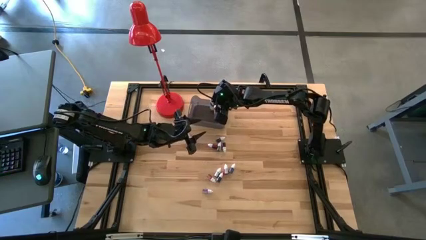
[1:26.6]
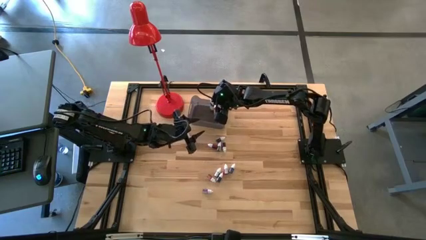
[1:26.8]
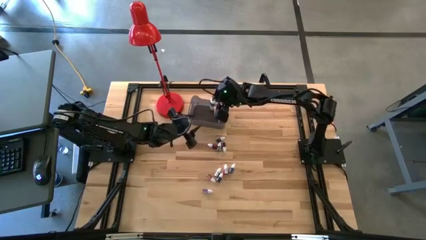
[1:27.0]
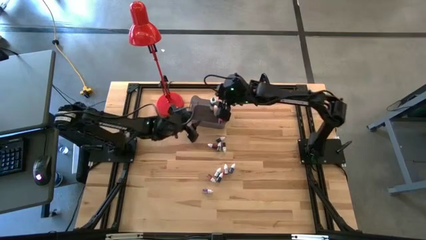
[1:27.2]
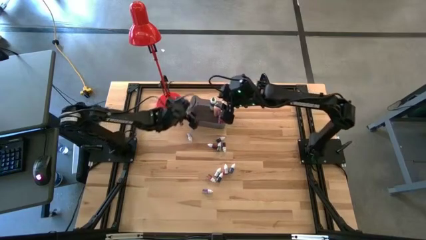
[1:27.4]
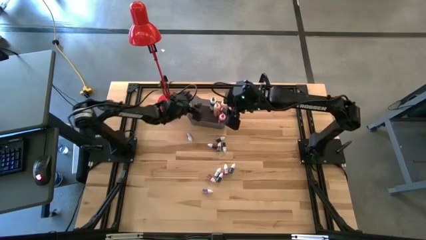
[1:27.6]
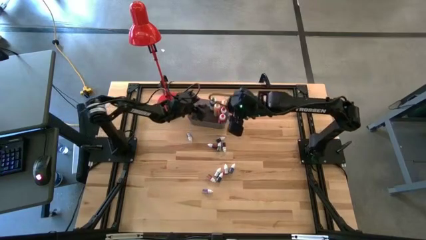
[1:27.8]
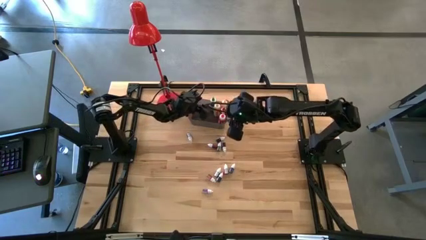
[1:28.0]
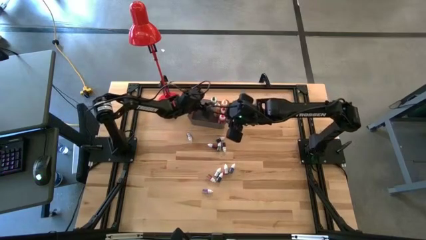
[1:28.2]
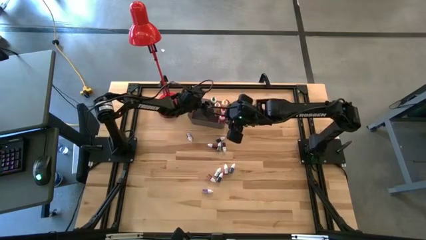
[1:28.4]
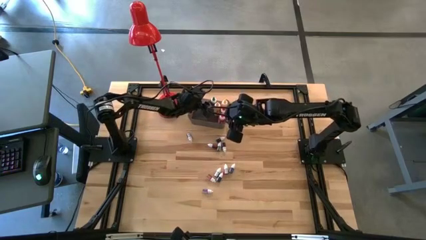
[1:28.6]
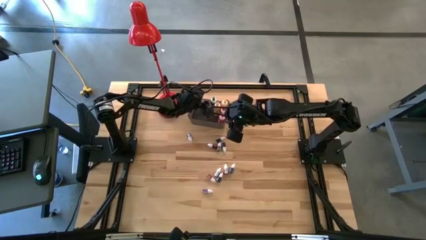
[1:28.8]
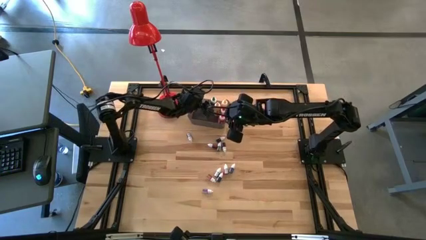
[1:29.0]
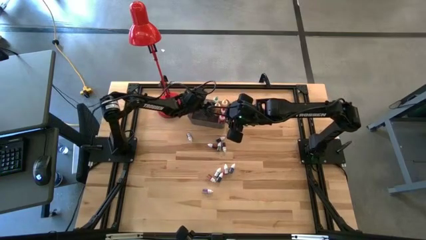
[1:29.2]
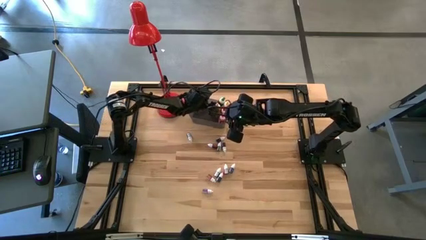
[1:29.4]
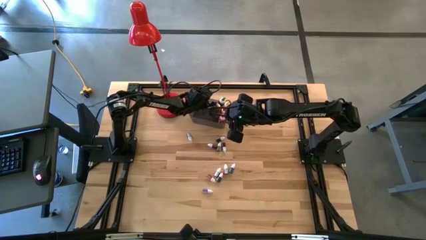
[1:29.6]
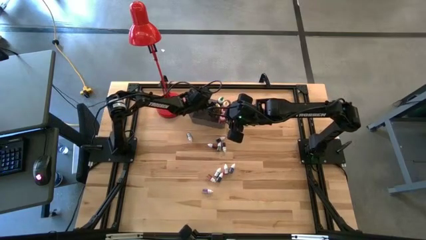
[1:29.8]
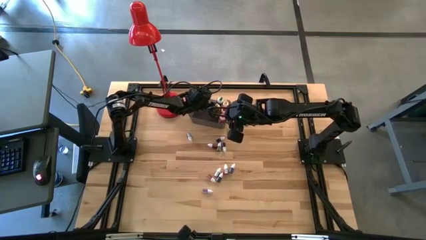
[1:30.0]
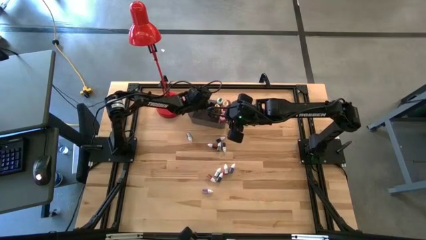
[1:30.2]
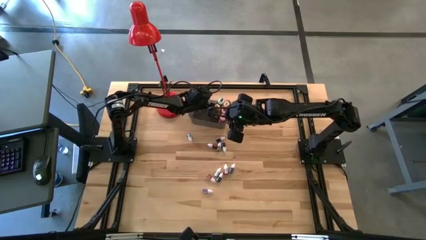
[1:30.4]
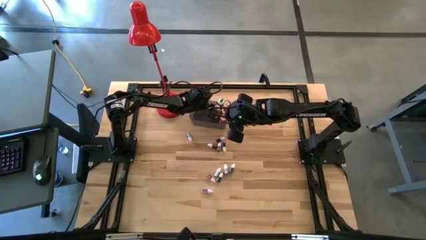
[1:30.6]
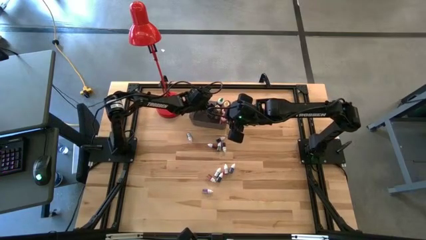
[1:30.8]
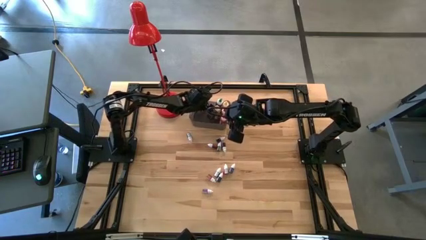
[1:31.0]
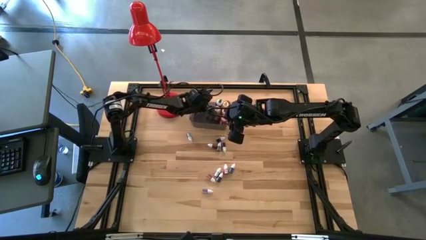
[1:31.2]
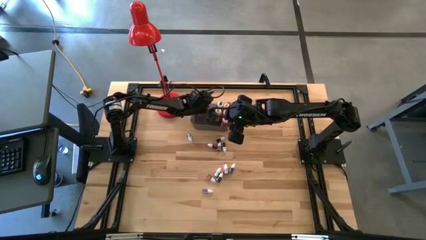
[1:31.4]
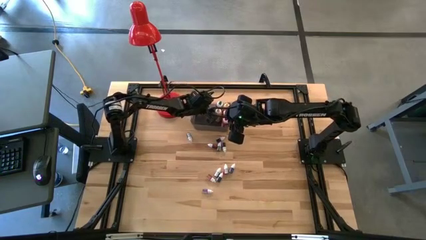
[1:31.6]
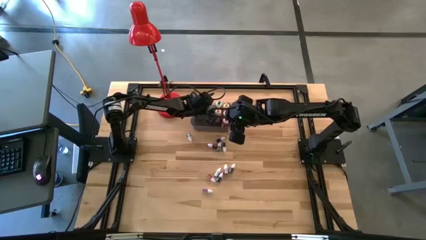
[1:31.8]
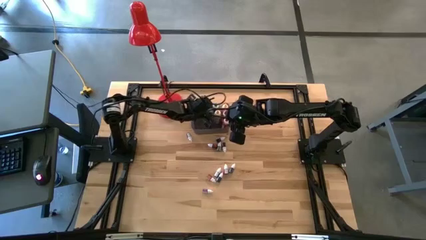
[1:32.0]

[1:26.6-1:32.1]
Task: Pick & Place food coloring
Adjust the large green food coloring bottle into the bin

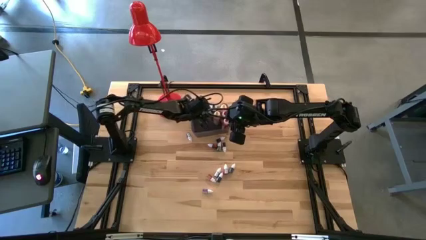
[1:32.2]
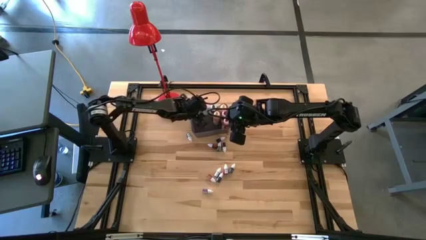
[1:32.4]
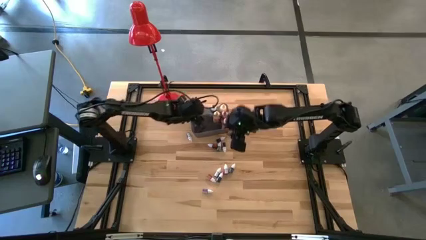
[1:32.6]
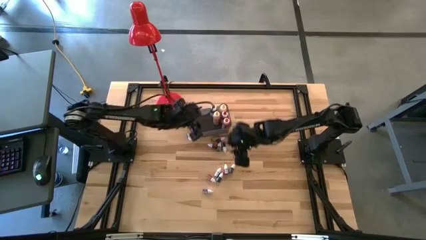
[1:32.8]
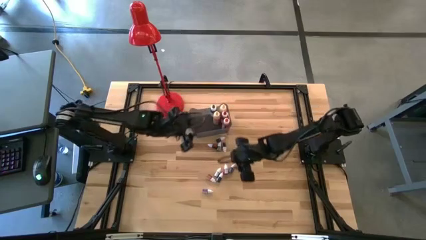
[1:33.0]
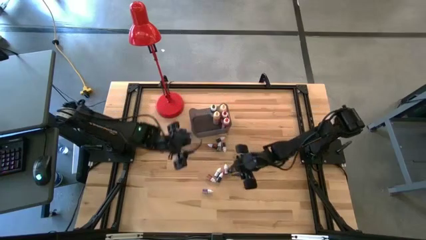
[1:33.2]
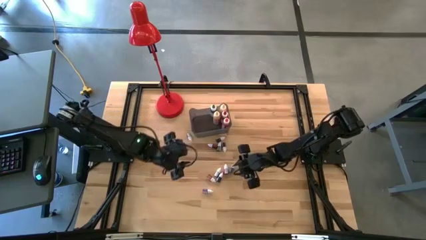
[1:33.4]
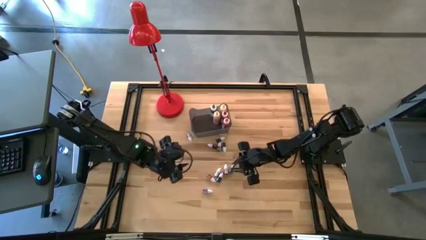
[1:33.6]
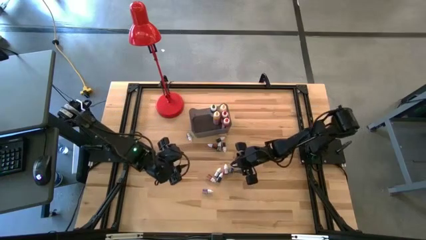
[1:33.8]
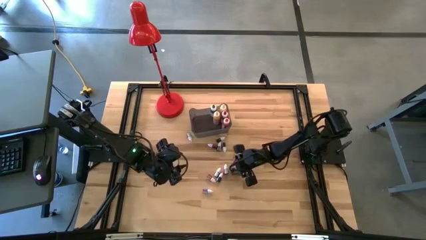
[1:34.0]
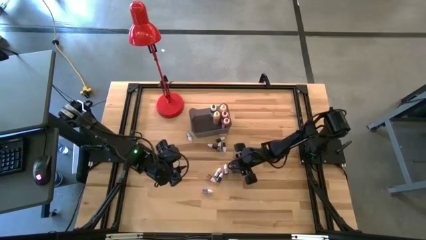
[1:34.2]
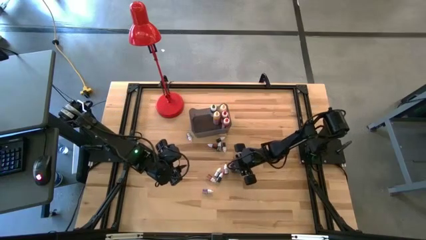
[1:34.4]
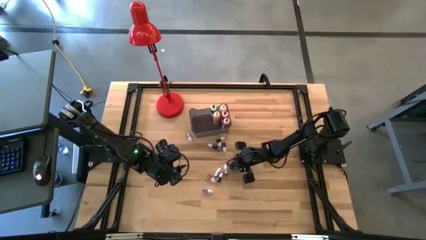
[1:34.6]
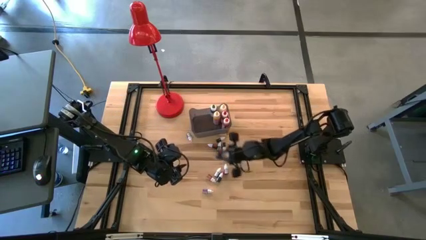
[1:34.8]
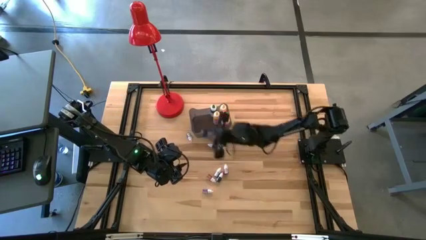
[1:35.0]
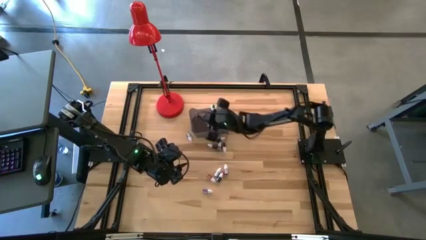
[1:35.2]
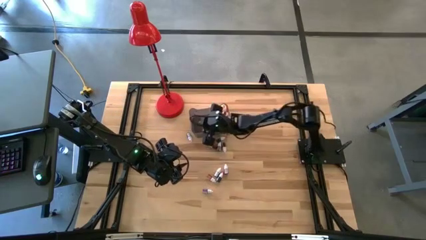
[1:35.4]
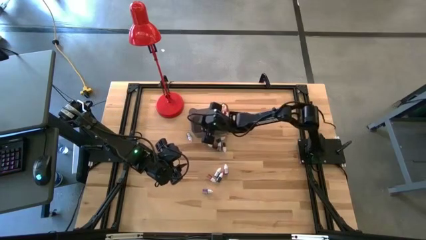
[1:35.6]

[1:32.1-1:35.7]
Put the right small dark blue food coloring bottle into the bin

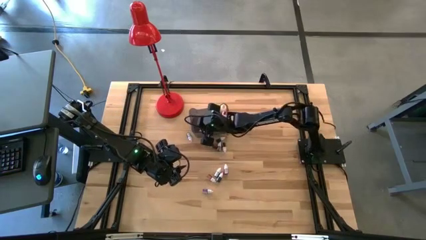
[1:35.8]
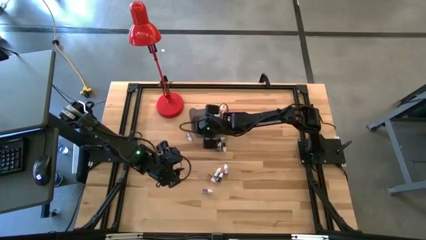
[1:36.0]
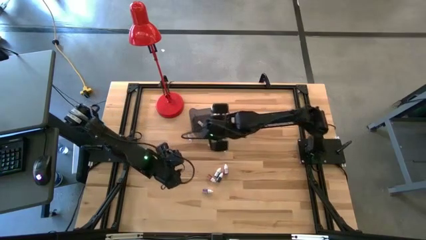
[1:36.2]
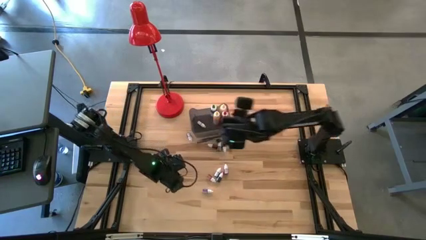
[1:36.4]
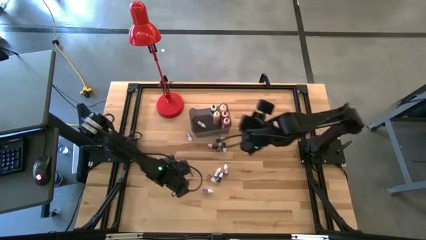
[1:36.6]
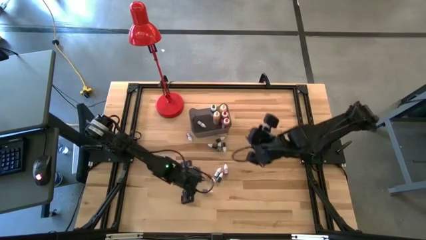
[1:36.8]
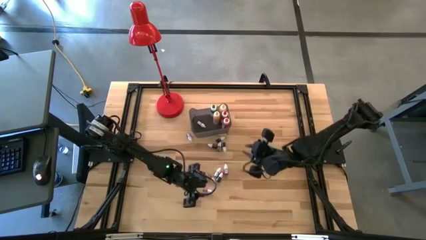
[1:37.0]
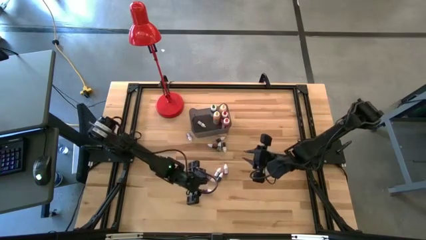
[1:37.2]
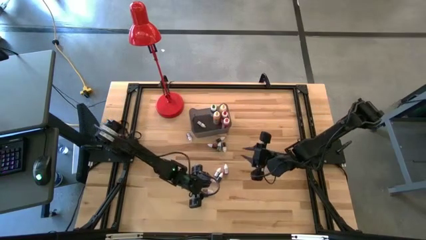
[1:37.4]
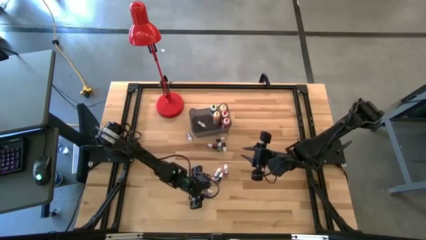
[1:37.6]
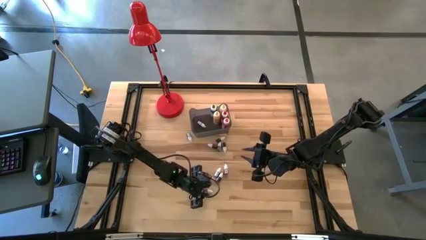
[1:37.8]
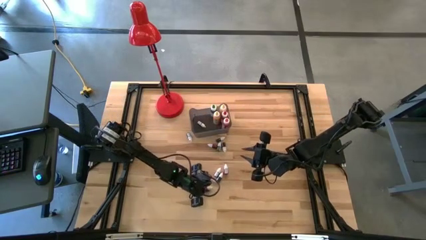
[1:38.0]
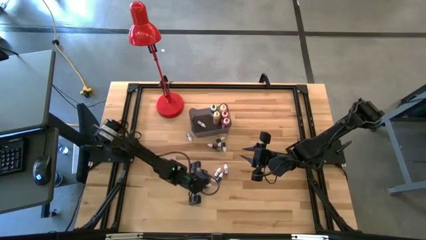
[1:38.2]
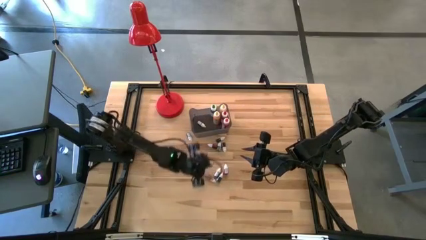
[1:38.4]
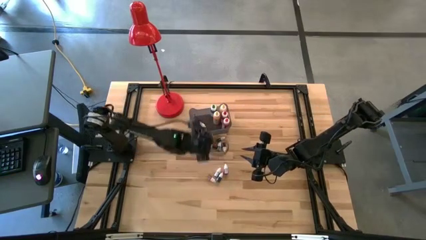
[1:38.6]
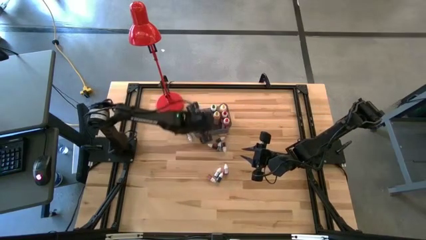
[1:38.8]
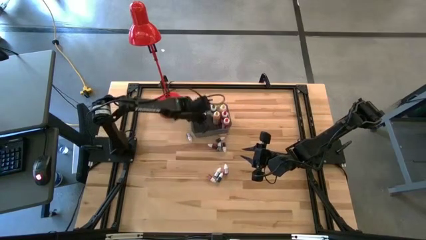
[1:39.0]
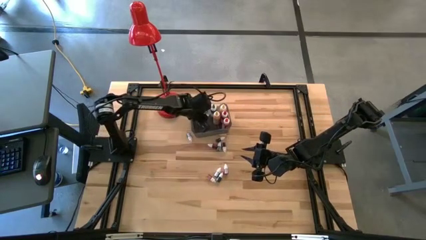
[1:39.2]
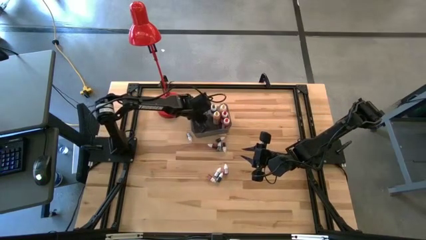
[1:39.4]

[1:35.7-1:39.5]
Put the small purple food coloring bottle into the bin

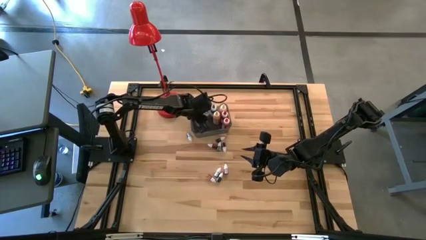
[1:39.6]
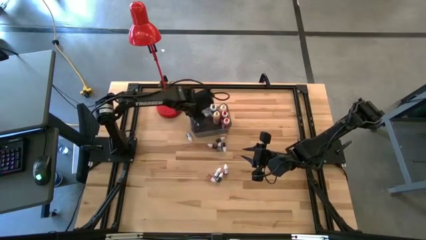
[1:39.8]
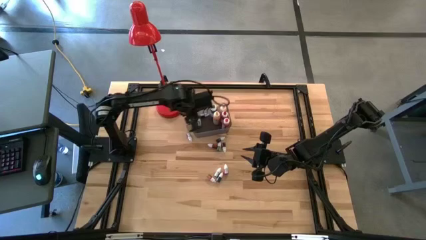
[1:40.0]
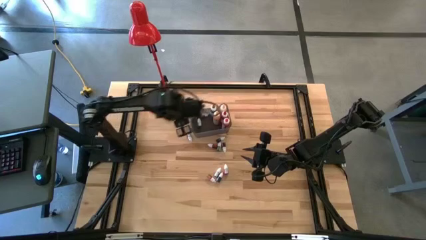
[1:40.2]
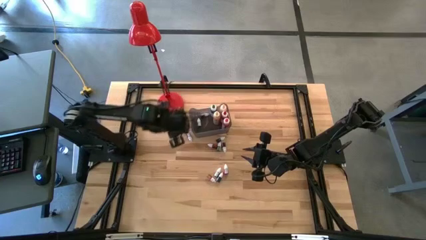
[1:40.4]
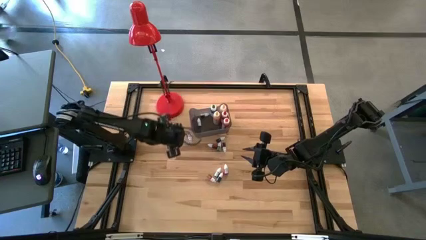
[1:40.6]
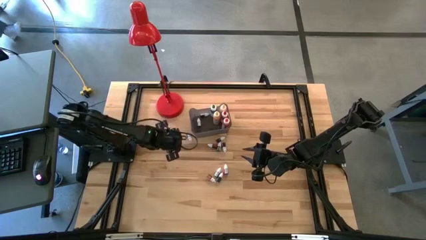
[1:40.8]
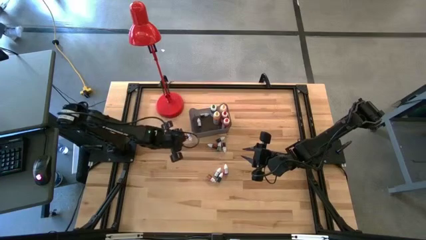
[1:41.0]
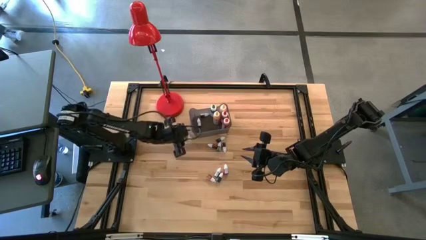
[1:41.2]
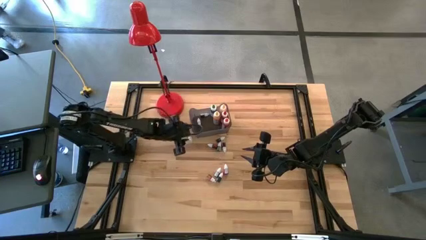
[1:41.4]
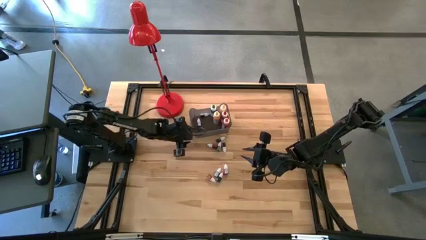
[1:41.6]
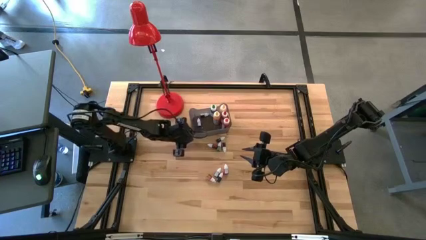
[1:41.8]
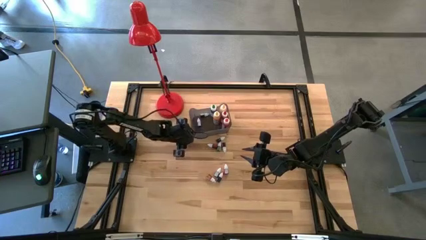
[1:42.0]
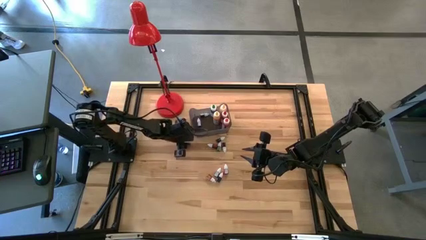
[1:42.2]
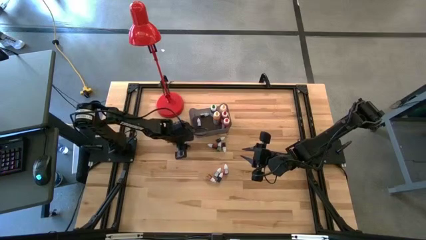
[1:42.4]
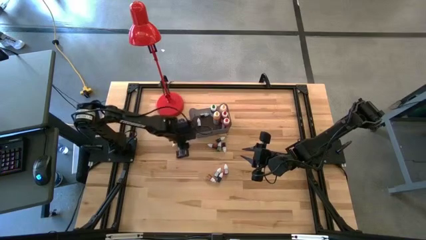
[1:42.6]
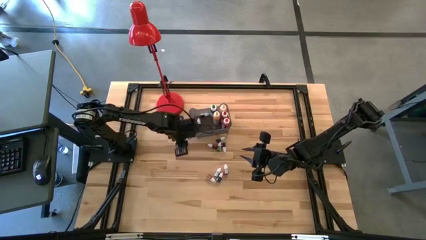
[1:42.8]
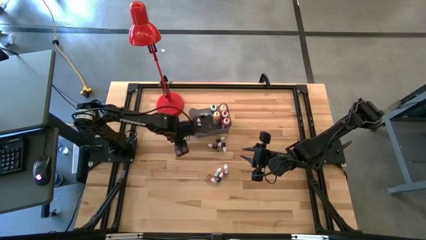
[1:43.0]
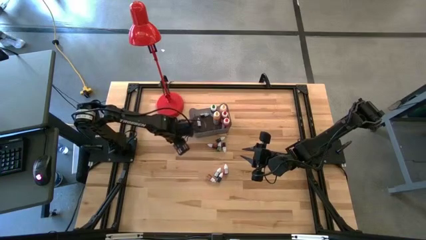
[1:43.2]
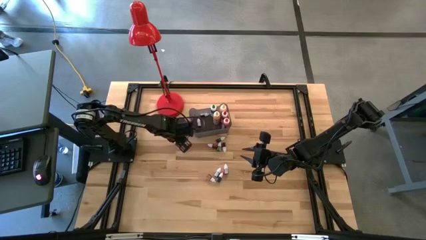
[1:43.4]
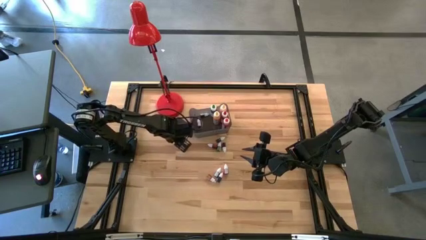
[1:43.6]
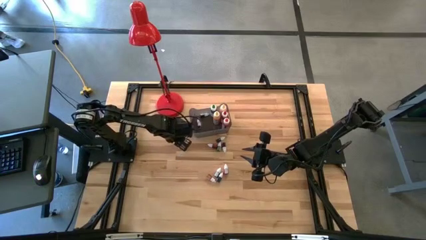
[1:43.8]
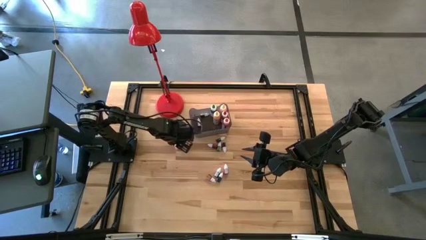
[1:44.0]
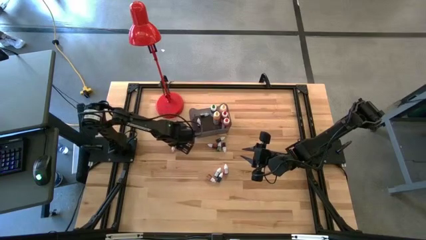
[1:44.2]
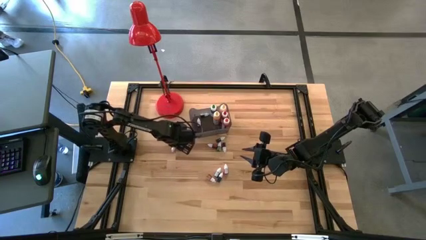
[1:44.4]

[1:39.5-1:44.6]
Put the left small green food coloring bottle into the bin
